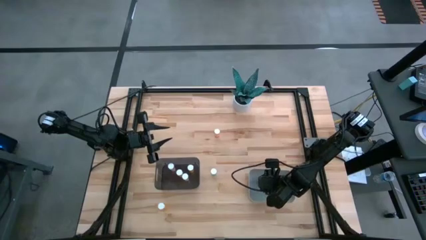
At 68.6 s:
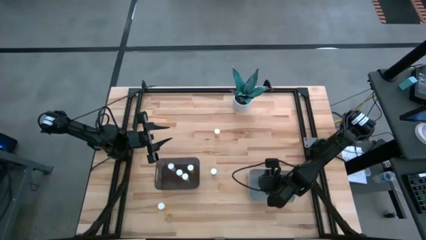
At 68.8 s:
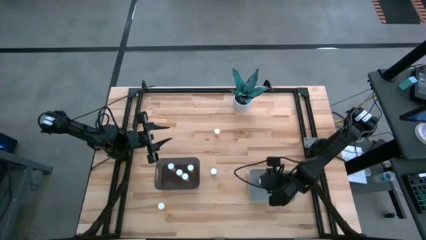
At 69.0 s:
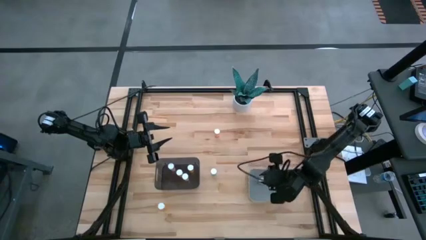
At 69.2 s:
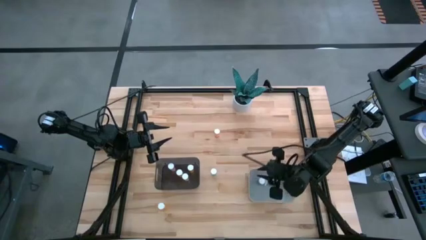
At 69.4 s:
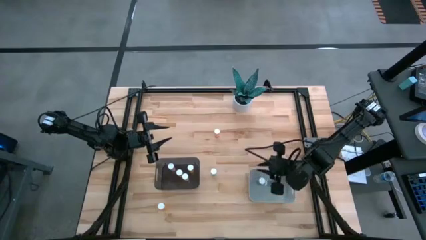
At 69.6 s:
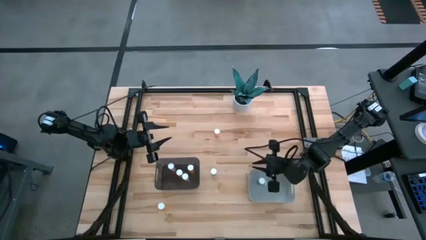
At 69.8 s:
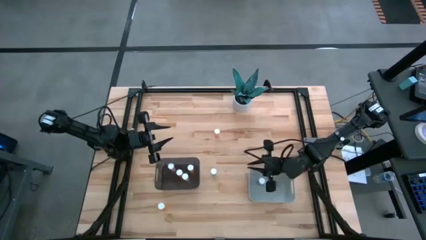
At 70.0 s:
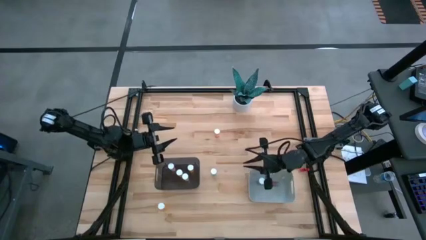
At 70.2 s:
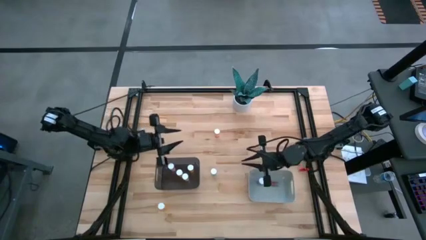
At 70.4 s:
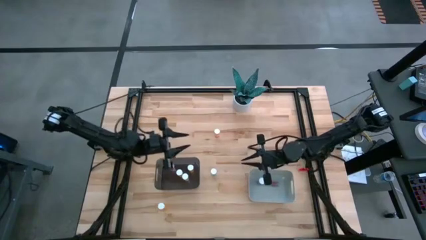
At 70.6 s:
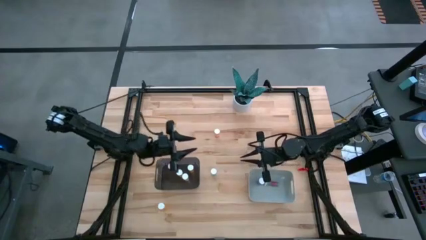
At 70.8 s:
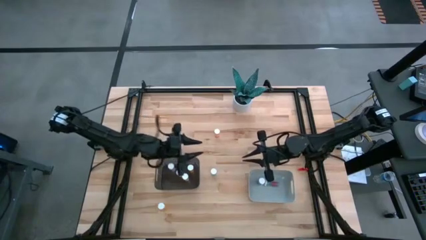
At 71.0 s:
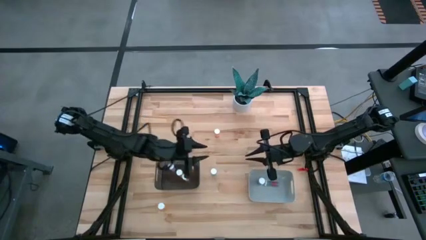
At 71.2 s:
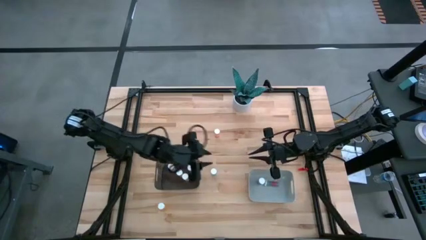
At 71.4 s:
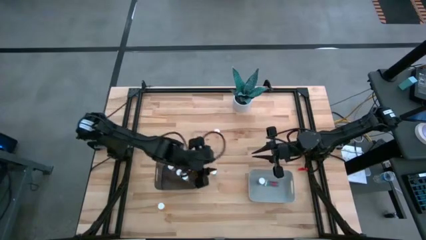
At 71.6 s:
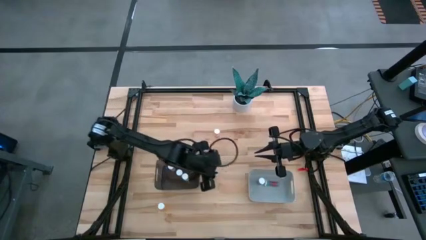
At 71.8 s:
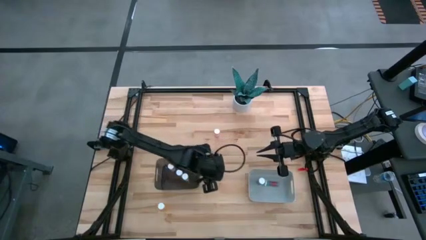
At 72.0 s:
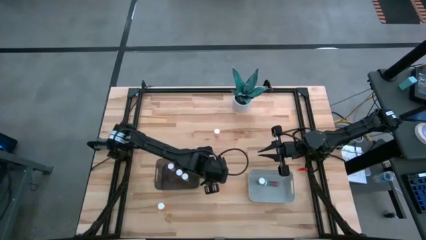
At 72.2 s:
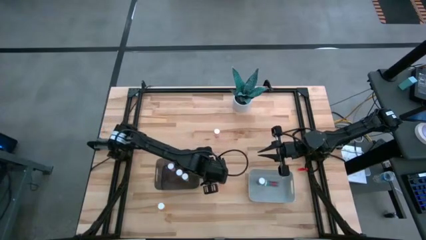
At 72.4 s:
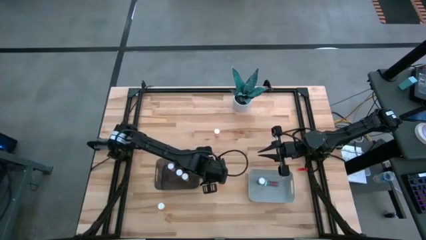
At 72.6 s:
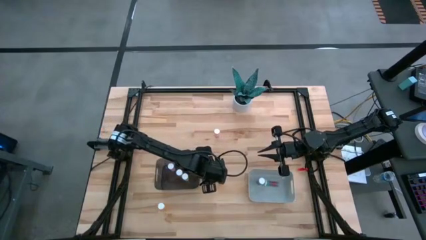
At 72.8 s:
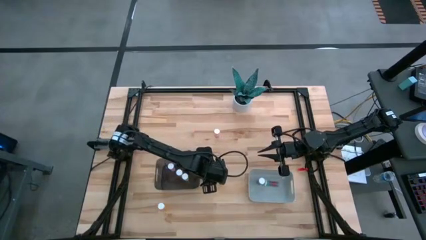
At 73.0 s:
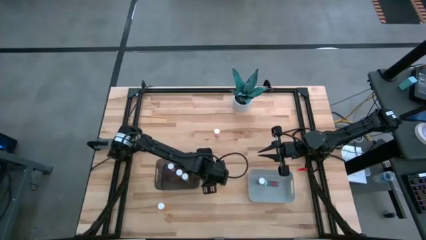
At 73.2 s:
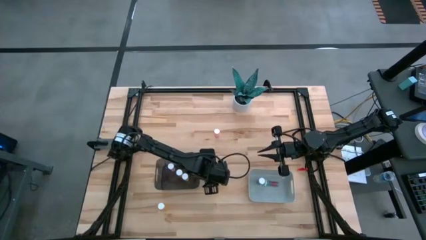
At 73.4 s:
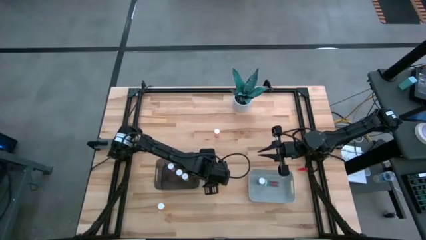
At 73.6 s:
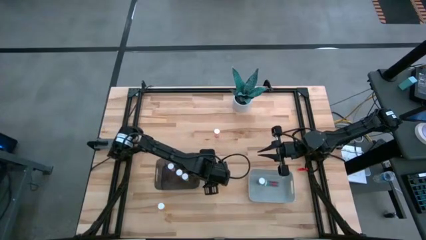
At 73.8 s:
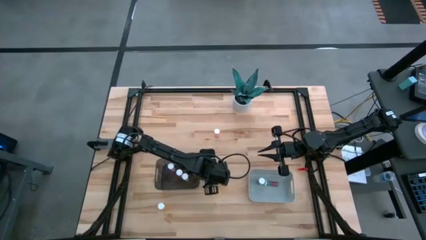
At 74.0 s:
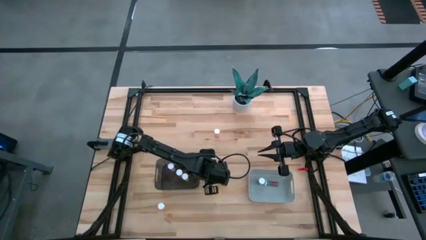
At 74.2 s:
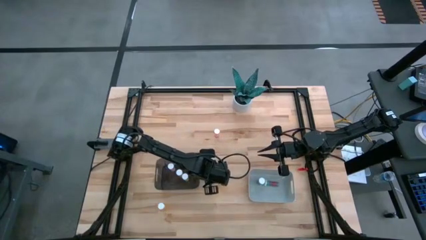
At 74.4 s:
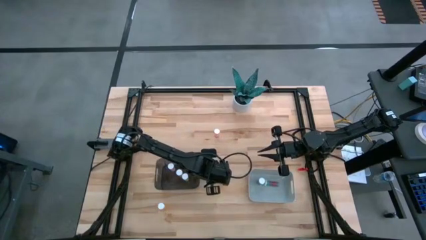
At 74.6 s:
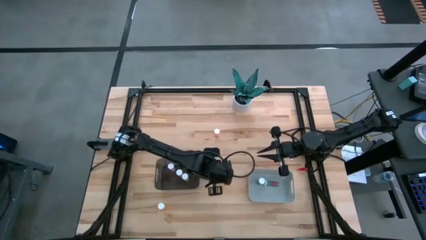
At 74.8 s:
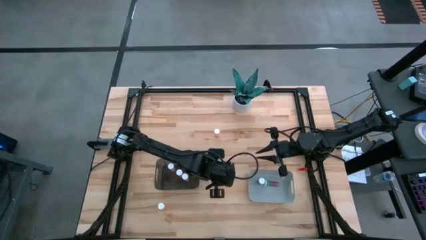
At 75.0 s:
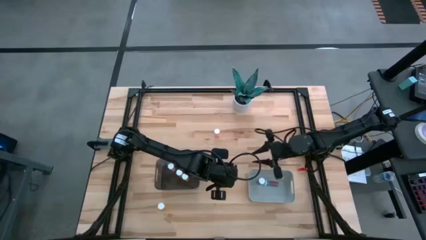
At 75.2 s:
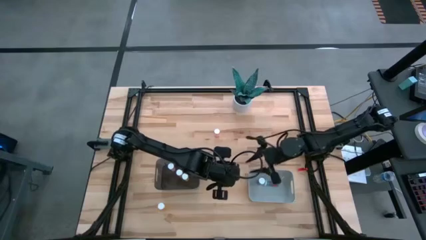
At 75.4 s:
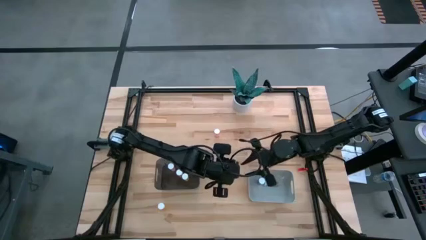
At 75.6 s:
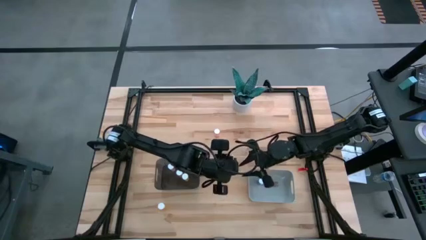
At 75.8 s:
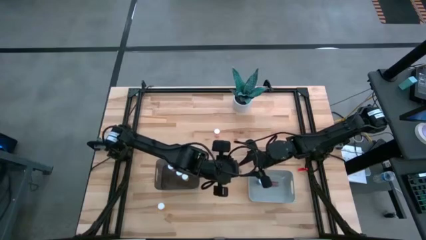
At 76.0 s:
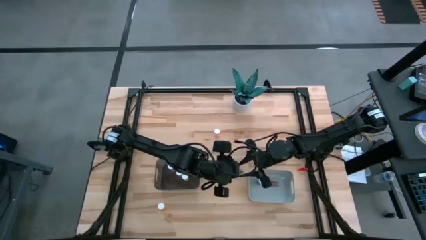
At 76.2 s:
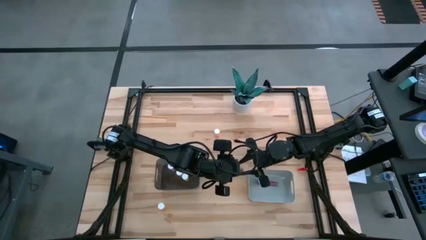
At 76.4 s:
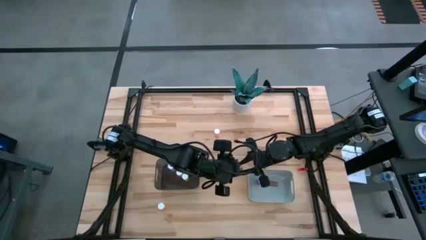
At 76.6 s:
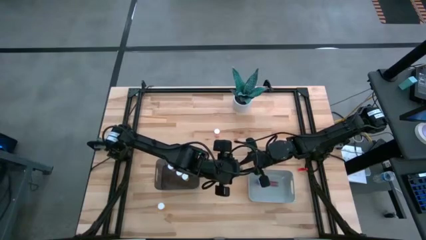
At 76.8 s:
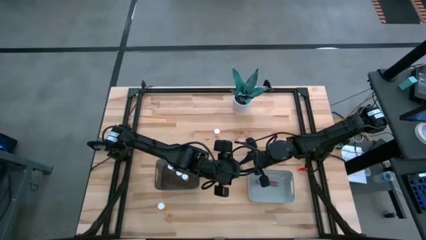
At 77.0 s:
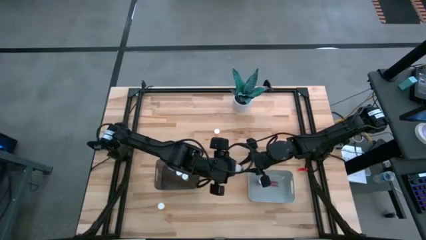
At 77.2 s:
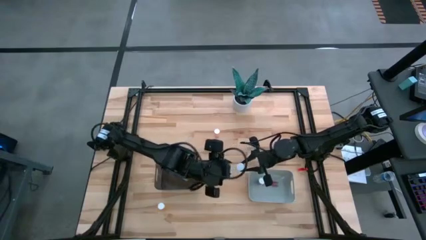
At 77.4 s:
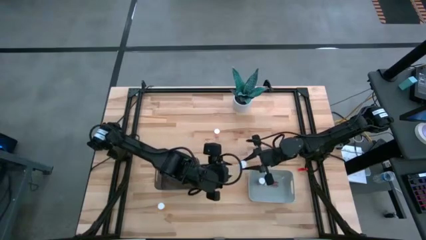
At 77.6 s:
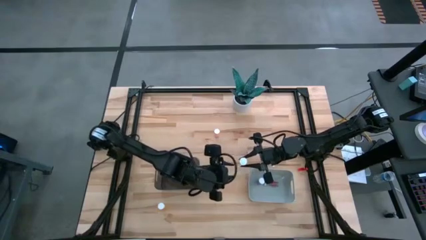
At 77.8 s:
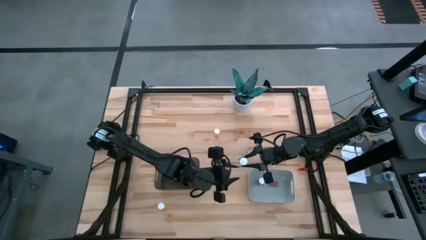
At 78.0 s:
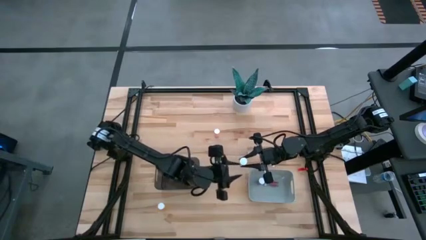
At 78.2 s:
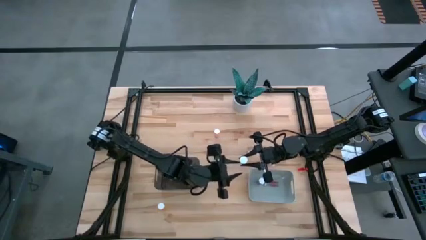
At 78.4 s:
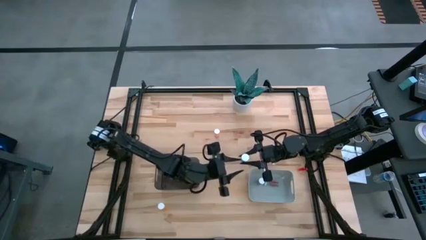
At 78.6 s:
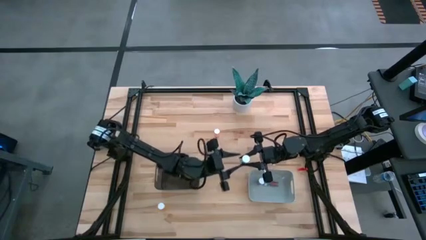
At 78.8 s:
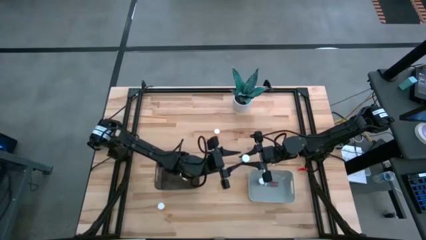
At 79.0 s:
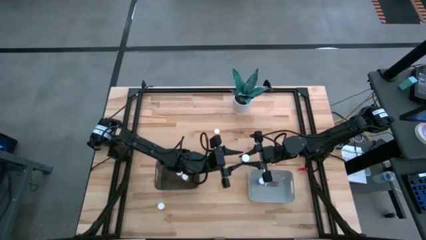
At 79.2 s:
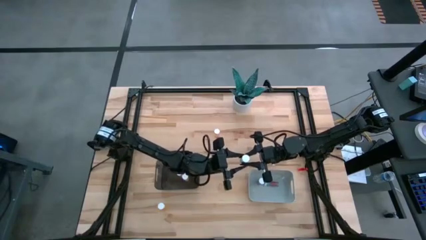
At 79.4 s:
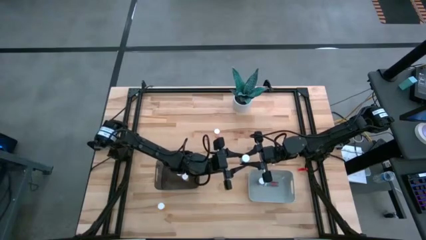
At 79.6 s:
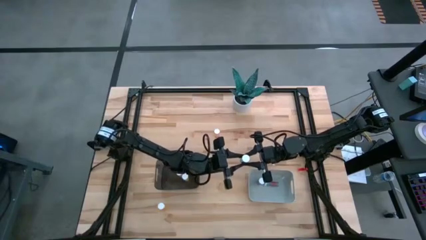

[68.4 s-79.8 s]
Task: Pick and place medicine bottles into bin by pill shape (circle, oval)
Put the blue capsule bottle into the gray bin
